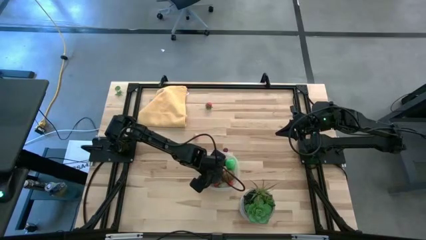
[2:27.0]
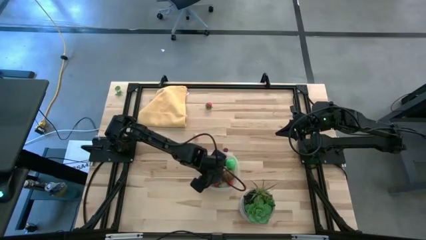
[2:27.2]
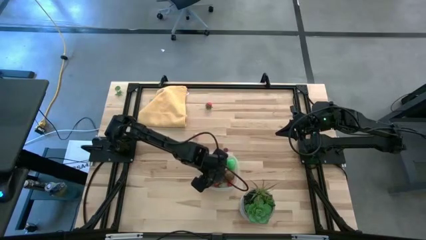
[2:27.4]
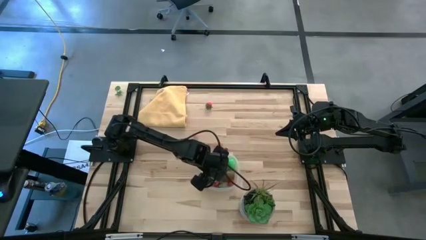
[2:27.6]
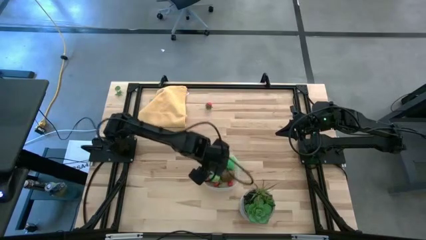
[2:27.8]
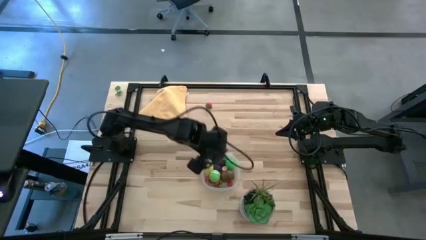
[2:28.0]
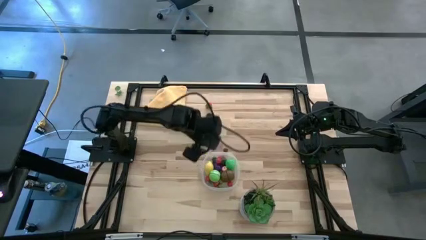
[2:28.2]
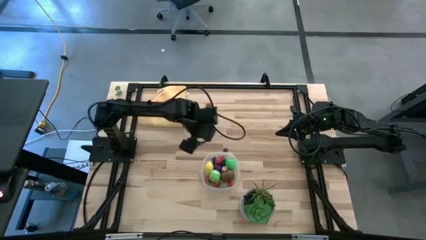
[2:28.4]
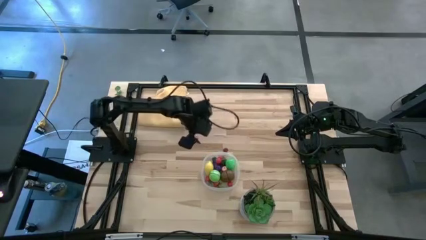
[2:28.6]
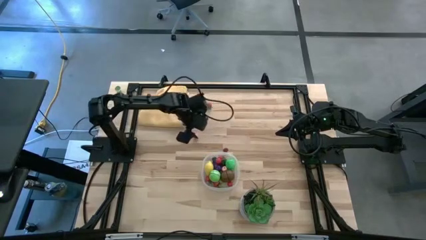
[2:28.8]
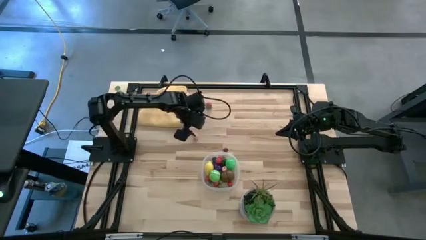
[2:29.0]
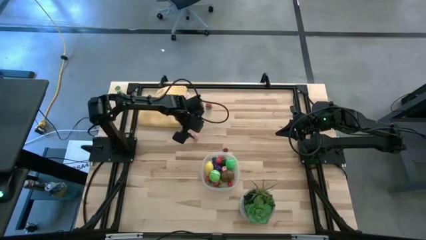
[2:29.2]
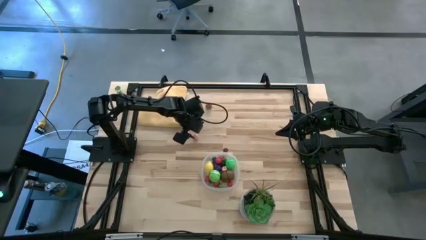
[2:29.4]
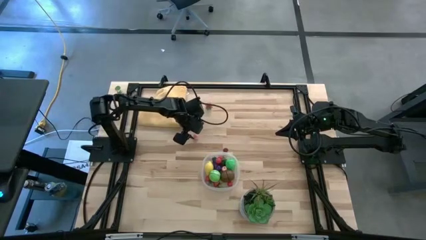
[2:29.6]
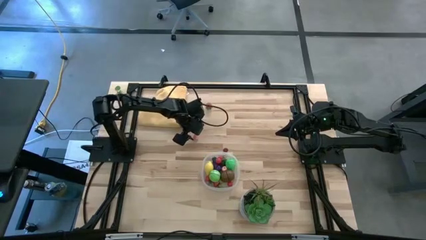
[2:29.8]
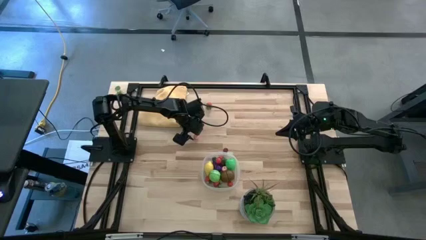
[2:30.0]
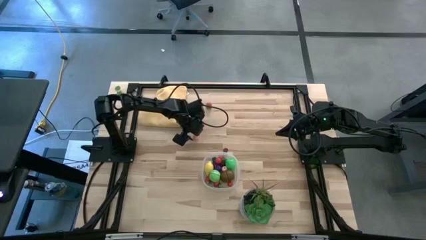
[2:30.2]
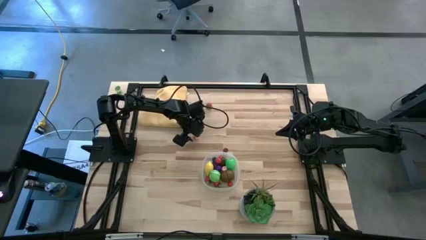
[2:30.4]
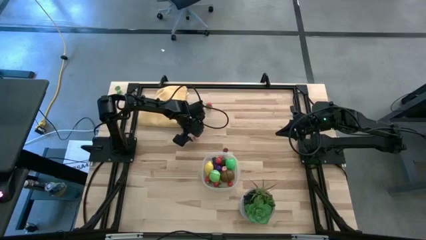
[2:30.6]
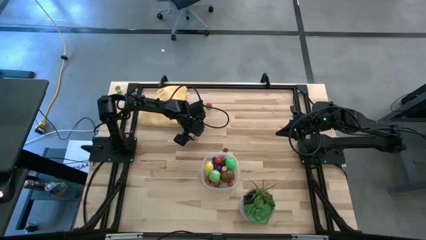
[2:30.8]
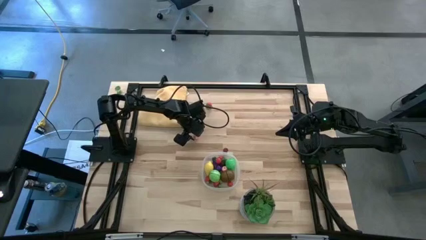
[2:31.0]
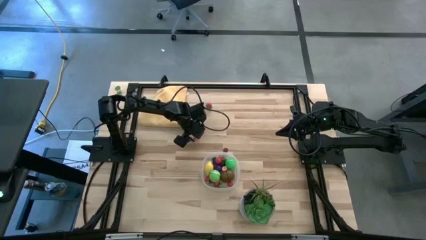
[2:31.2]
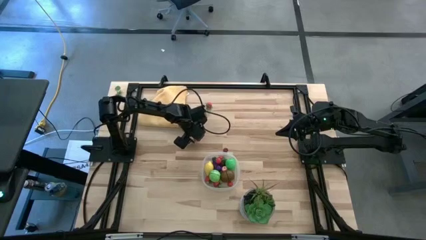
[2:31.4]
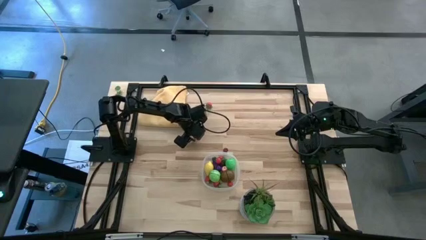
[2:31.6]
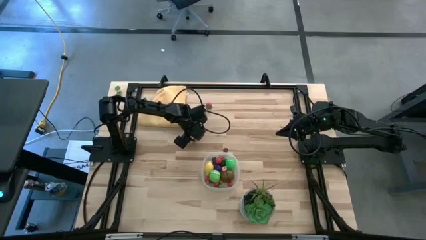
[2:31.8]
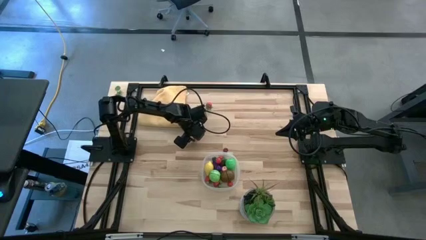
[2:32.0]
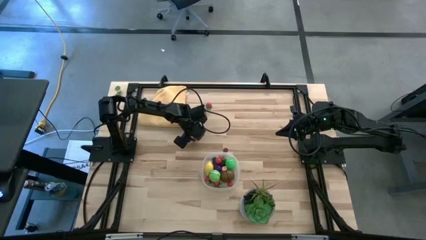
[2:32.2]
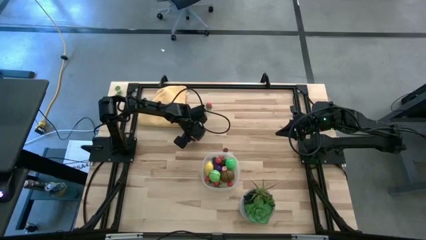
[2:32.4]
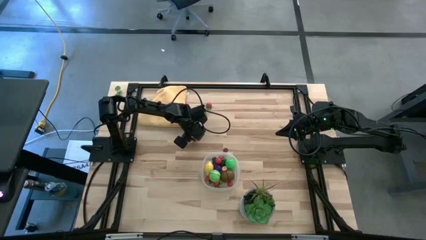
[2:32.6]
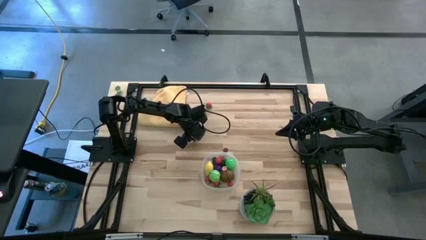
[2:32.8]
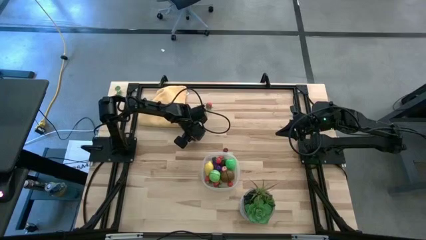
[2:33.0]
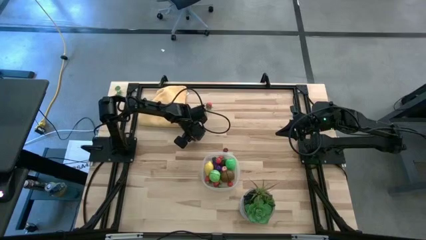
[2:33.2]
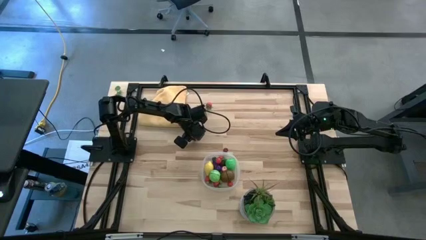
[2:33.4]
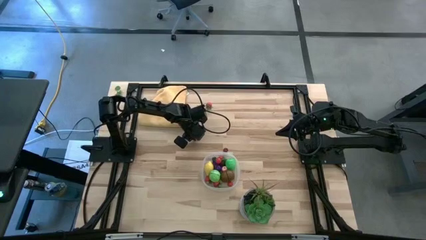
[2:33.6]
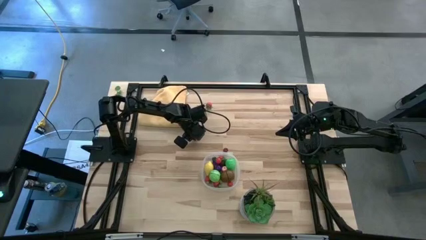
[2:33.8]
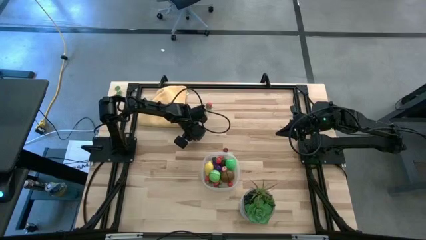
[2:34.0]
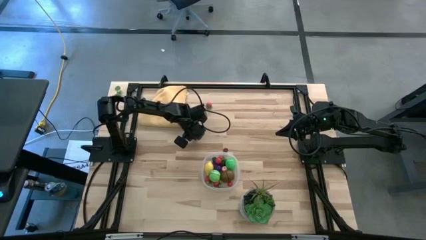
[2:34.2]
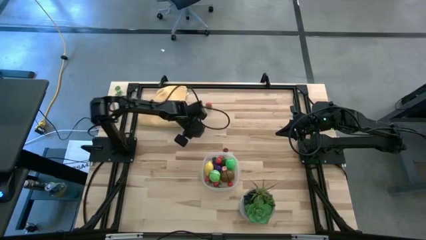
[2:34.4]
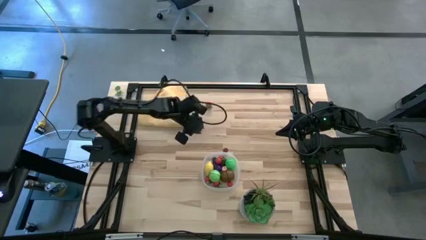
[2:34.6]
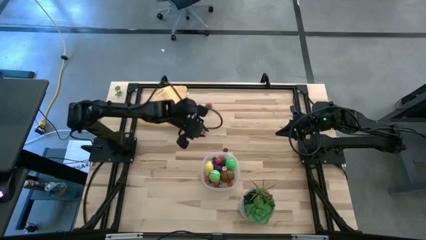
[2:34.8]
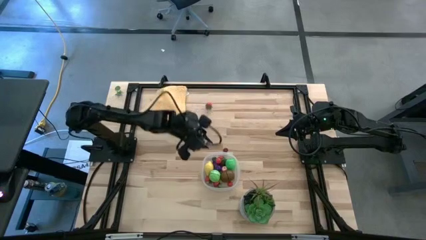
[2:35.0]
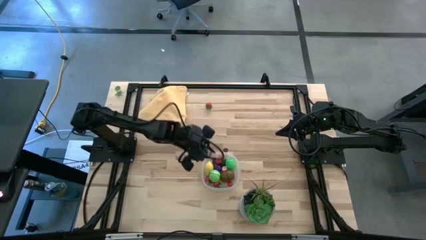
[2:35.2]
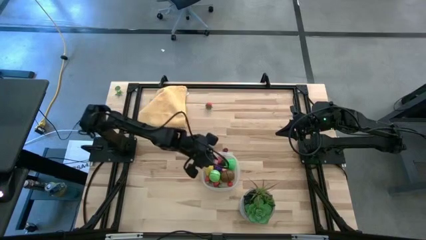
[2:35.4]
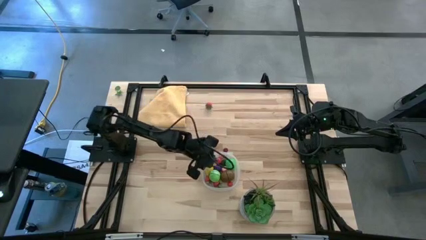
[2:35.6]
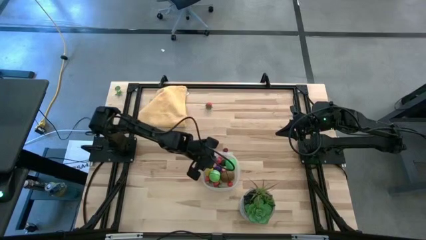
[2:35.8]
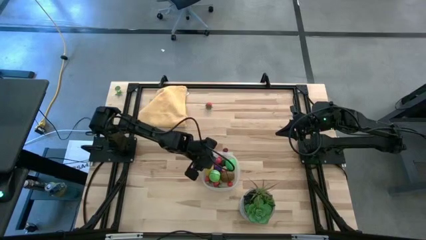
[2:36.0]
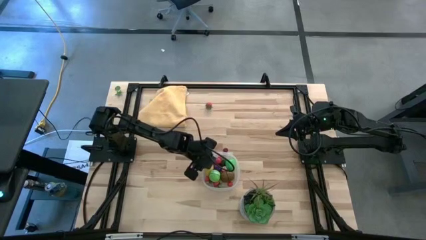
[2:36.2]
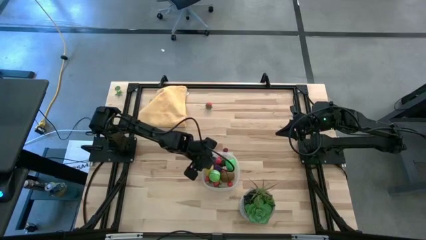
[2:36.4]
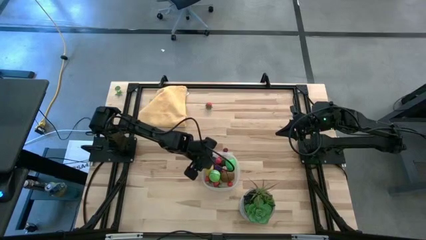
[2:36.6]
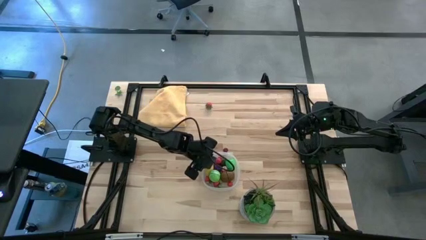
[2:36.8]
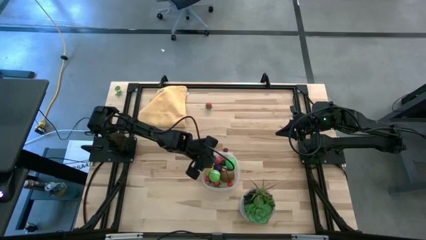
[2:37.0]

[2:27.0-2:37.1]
Task: Pick and placing Produce into tupperware
Put the pink peach into the transparent bin

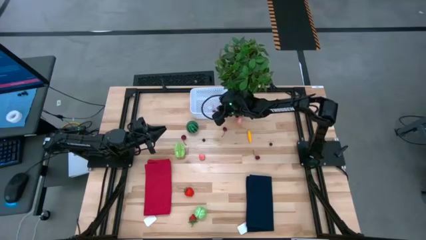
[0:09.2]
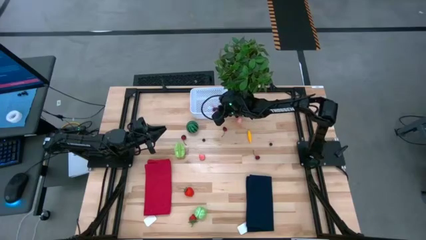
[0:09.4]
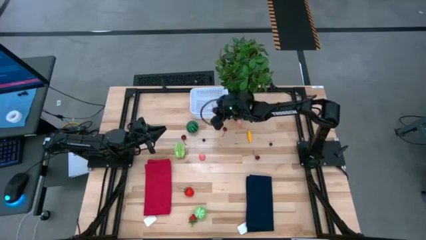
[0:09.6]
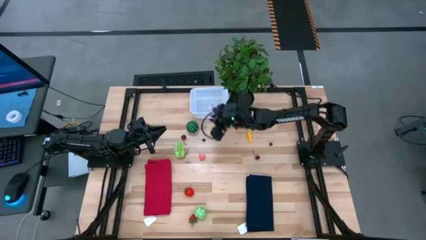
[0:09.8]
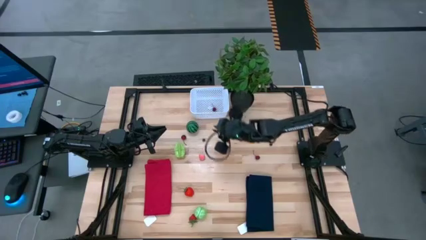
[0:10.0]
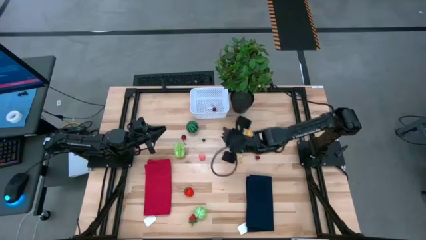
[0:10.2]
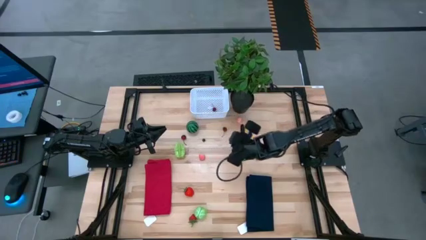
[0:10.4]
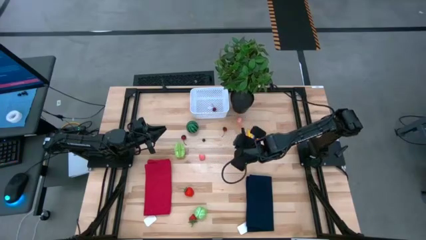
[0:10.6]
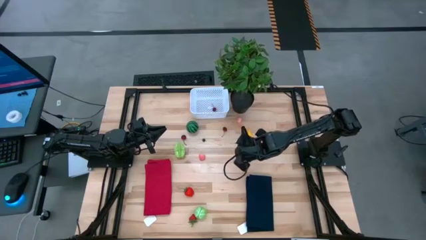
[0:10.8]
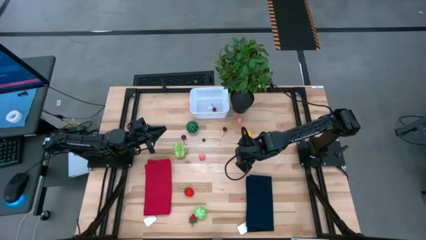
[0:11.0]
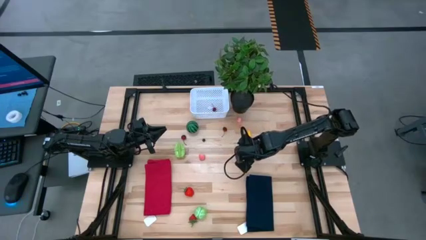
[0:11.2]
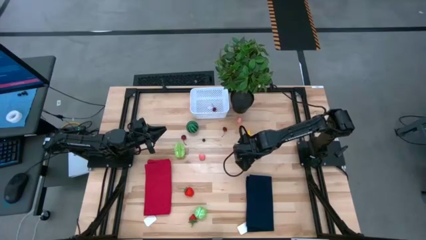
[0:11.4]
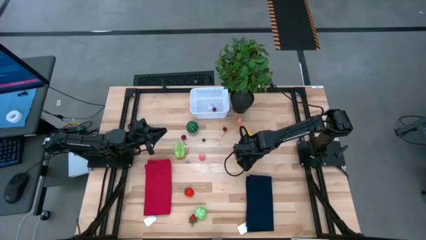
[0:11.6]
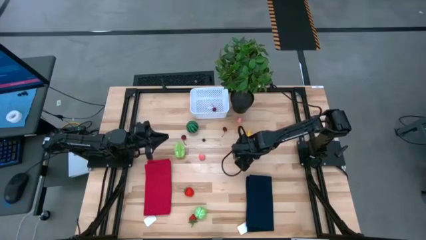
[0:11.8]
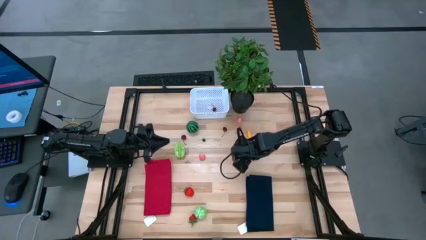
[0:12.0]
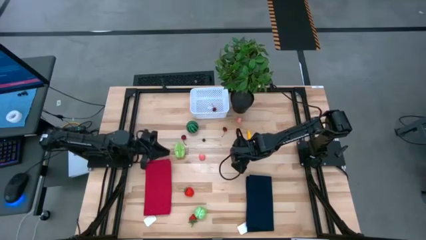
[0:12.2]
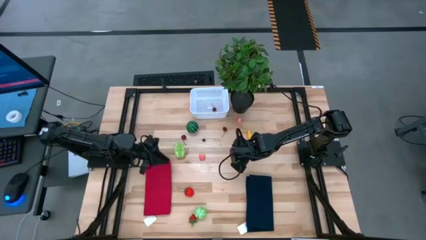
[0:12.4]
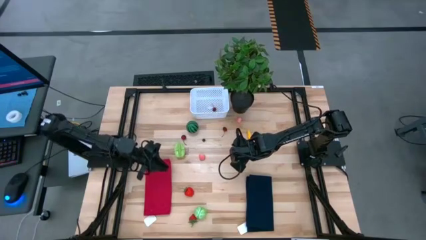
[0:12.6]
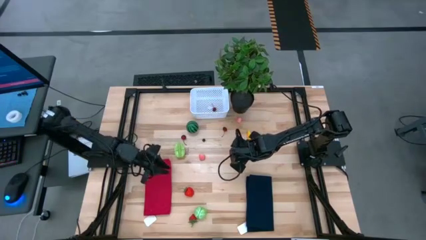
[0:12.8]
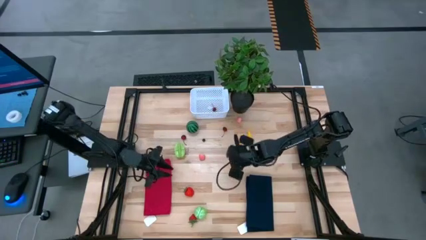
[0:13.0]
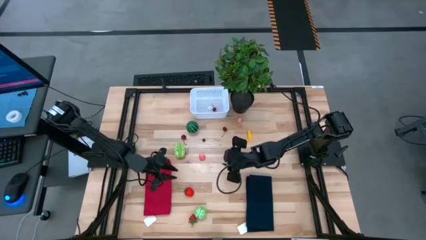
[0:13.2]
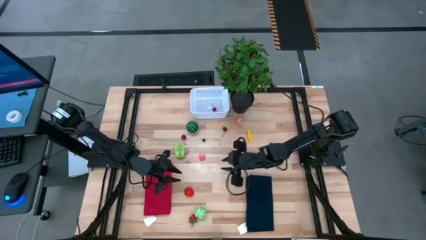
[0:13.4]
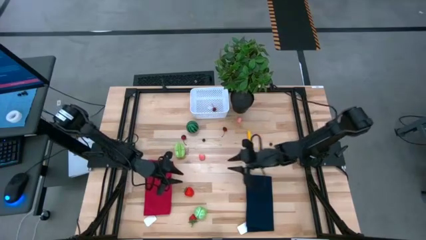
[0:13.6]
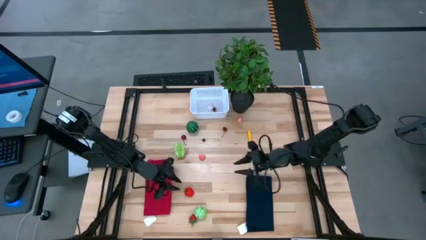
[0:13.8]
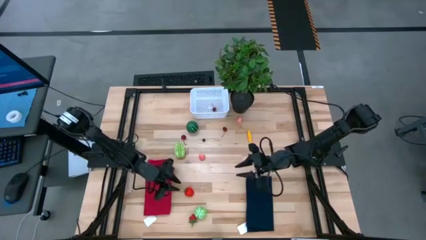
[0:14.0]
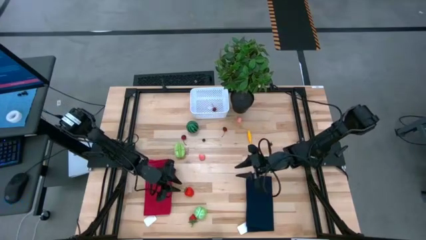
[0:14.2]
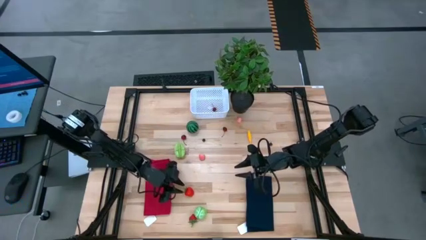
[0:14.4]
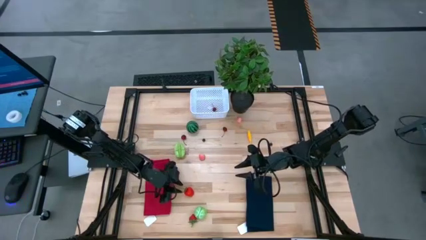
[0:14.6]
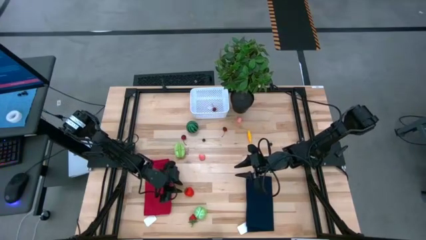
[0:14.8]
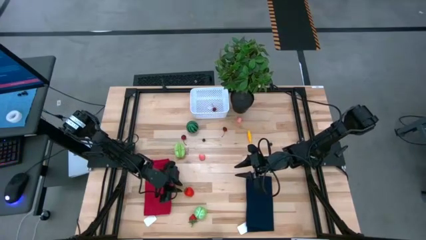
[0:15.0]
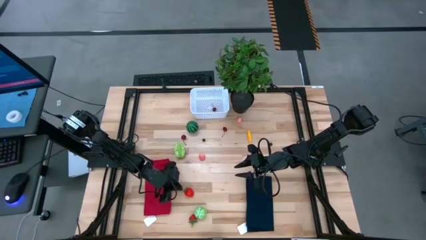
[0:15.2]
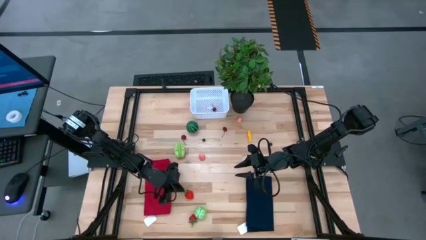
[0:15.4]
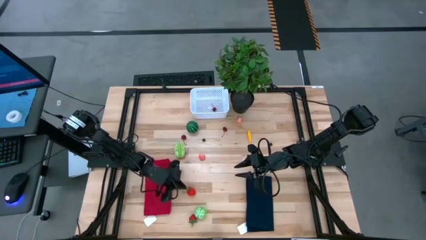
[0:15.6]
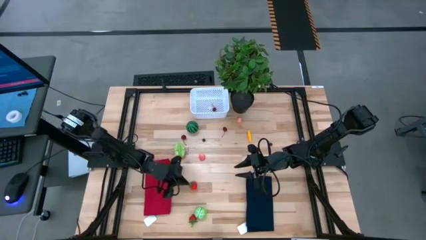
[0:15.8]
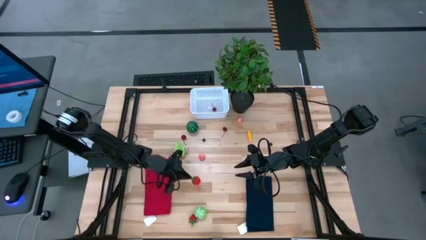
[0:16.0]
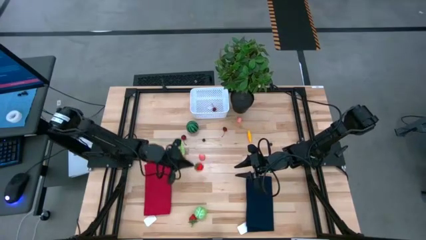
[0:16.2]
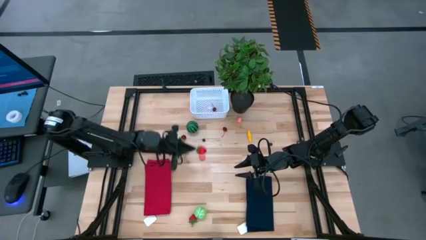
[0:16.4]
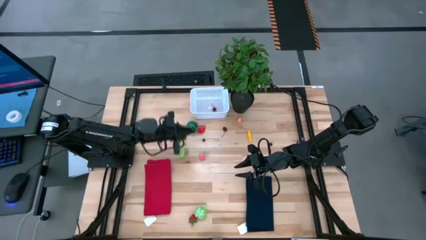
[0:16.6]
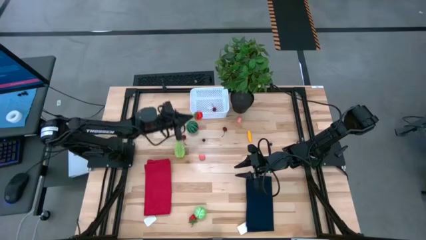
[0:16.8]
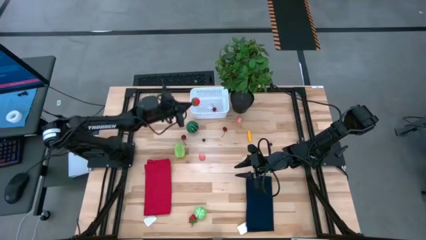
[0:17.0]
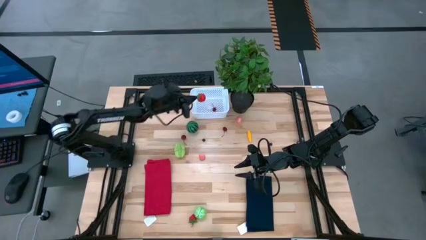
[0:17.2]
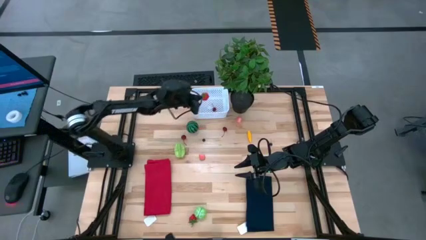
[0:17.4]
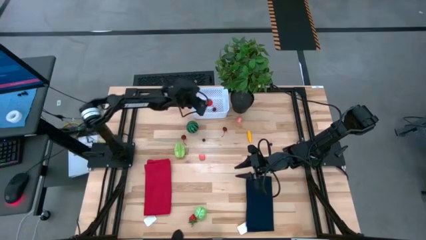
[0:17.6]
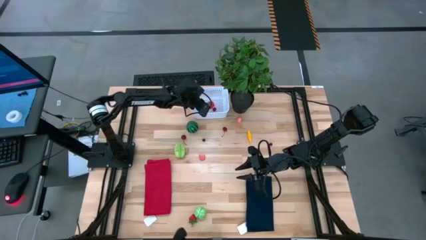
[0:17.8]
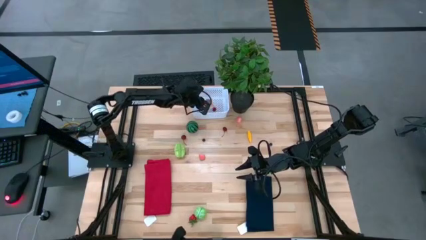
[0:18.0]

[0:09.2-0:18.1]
Task: Pick and placing Produce into tupperware
Put the red strawberry into the white basket
